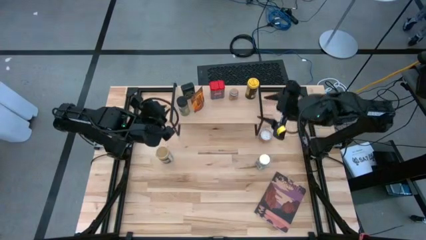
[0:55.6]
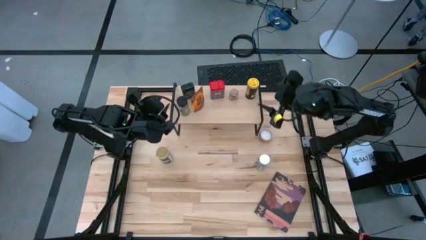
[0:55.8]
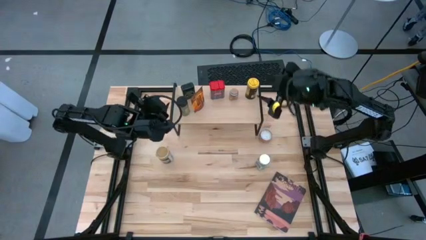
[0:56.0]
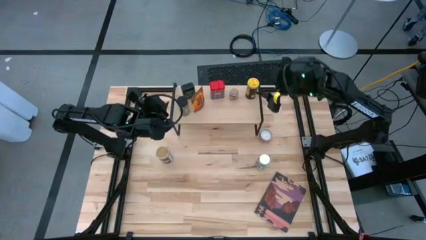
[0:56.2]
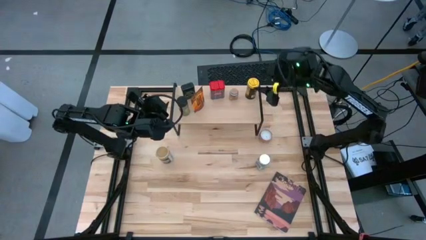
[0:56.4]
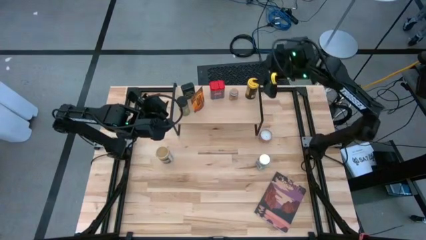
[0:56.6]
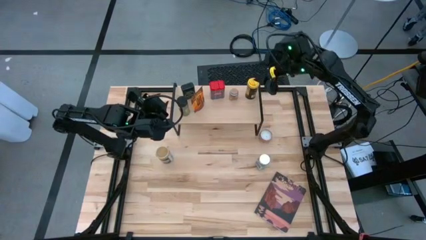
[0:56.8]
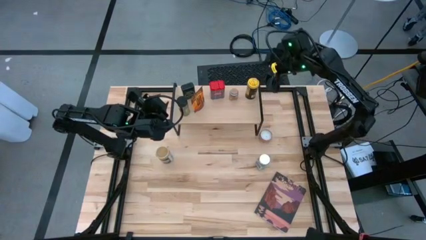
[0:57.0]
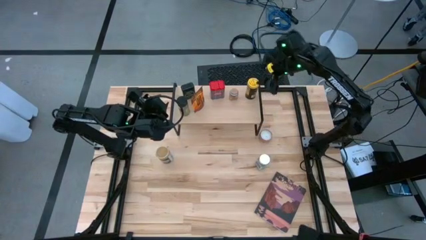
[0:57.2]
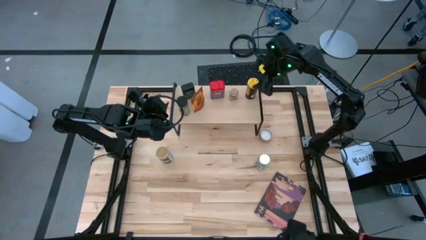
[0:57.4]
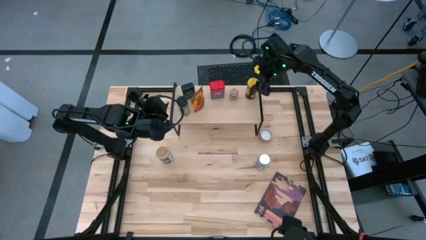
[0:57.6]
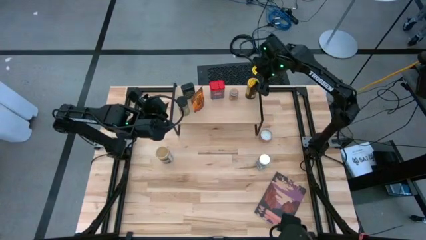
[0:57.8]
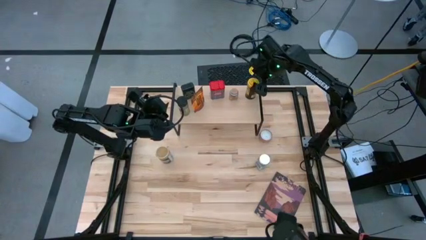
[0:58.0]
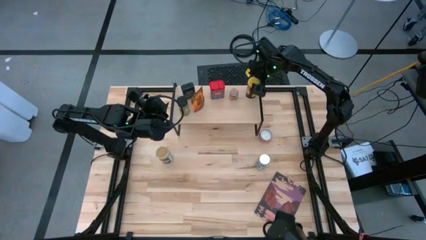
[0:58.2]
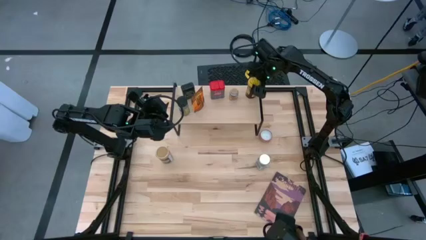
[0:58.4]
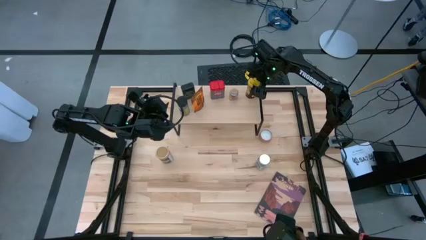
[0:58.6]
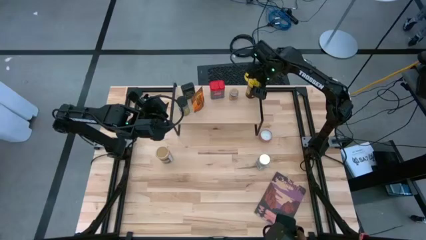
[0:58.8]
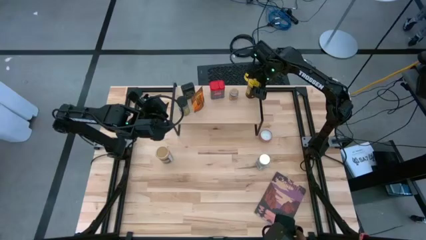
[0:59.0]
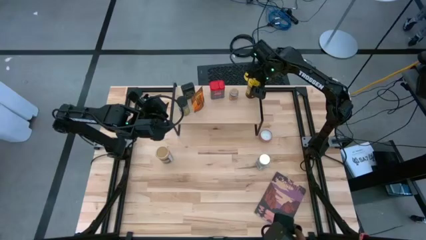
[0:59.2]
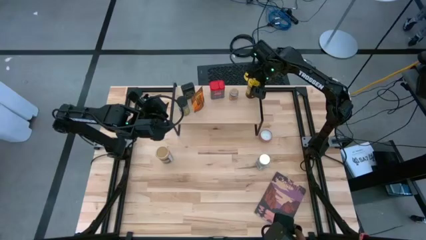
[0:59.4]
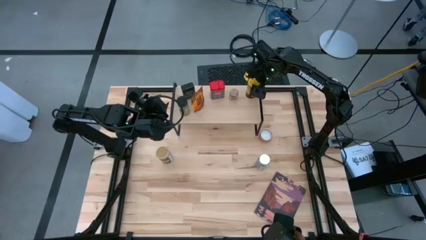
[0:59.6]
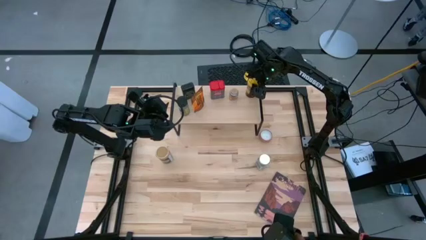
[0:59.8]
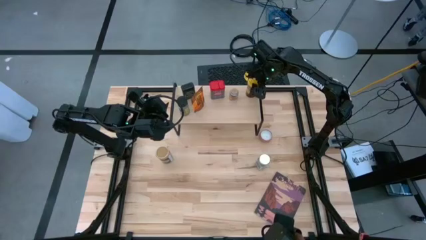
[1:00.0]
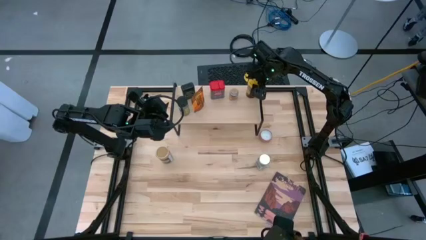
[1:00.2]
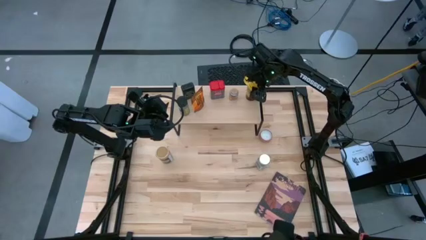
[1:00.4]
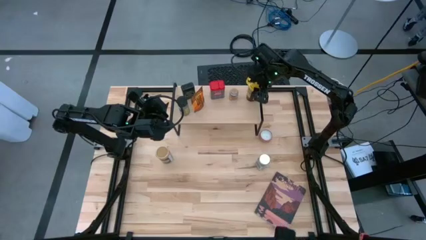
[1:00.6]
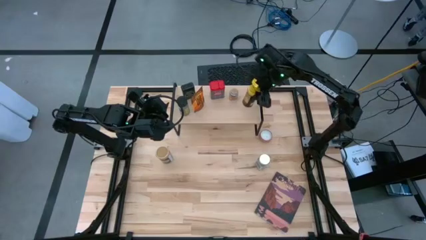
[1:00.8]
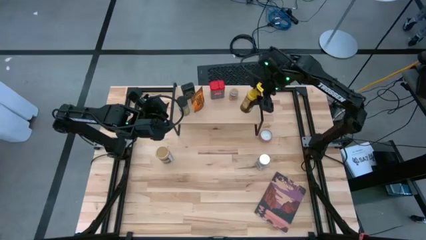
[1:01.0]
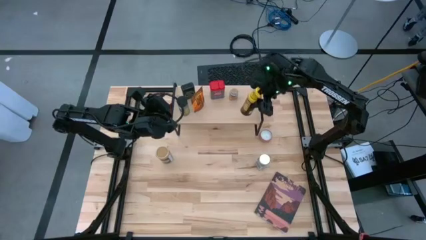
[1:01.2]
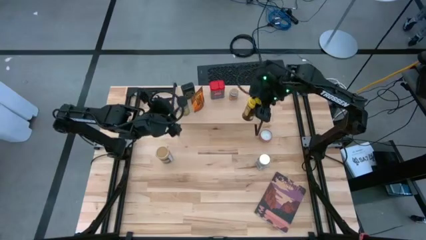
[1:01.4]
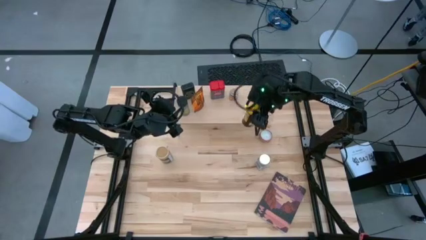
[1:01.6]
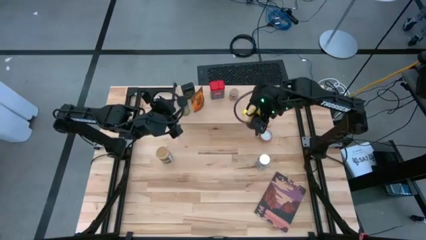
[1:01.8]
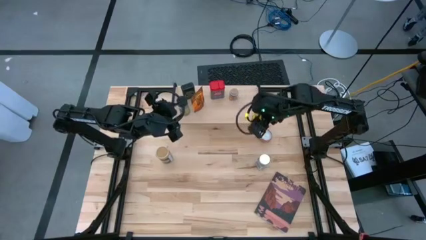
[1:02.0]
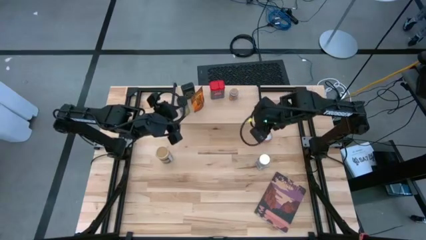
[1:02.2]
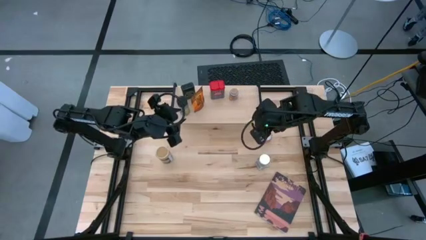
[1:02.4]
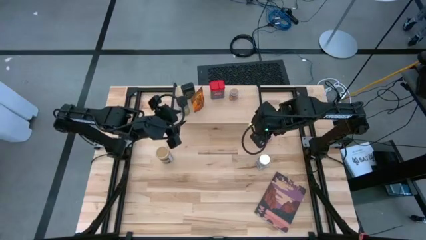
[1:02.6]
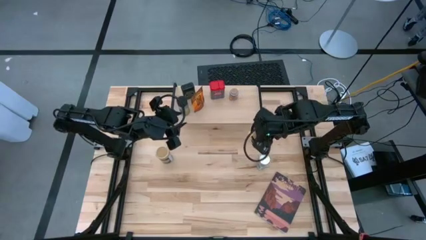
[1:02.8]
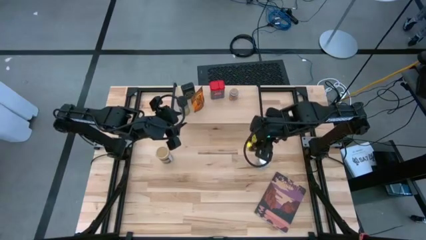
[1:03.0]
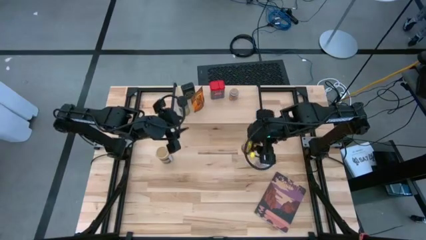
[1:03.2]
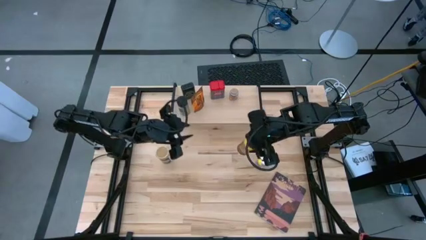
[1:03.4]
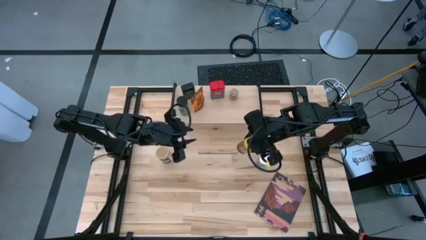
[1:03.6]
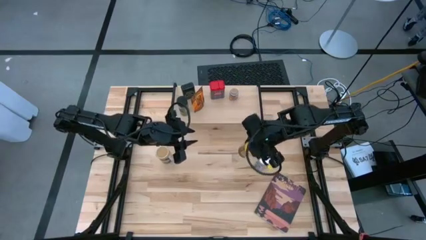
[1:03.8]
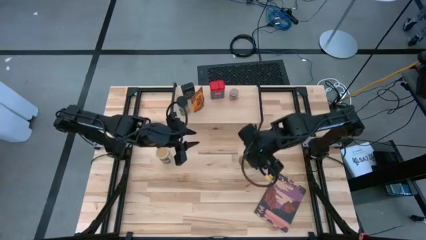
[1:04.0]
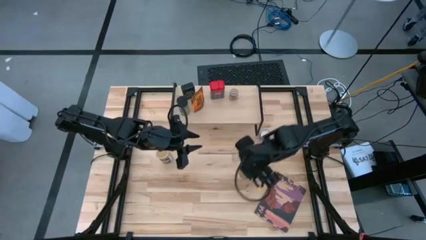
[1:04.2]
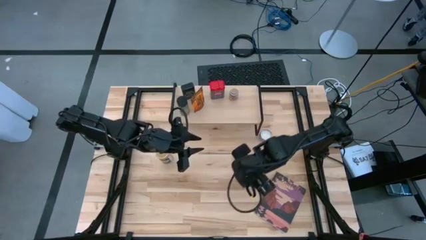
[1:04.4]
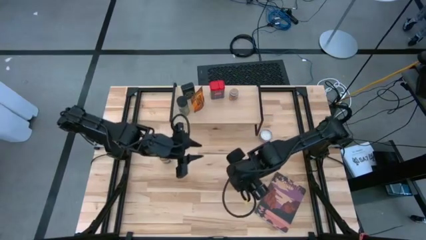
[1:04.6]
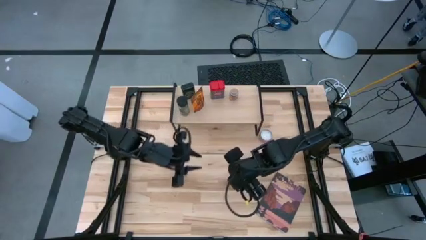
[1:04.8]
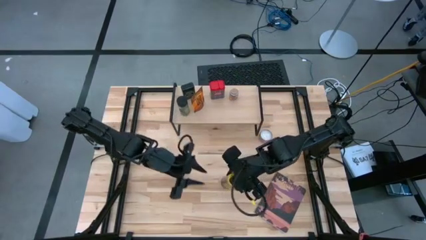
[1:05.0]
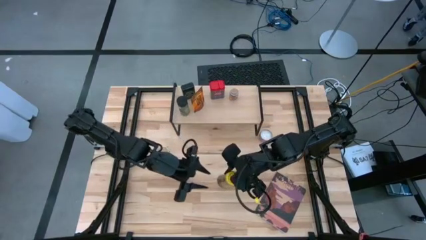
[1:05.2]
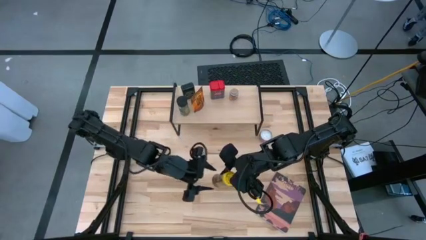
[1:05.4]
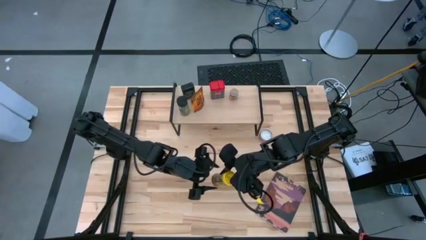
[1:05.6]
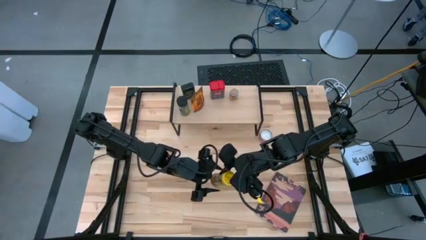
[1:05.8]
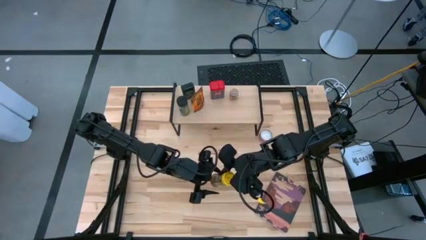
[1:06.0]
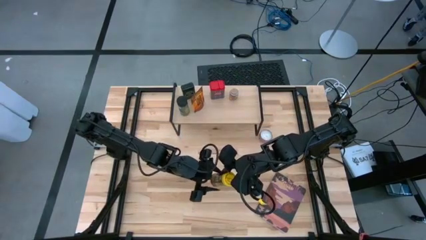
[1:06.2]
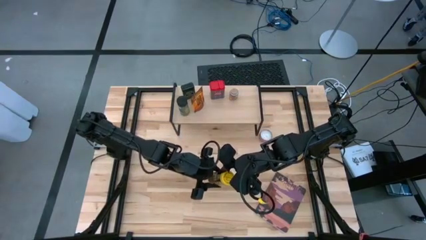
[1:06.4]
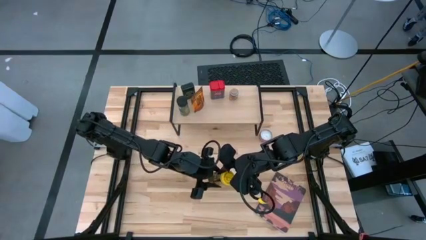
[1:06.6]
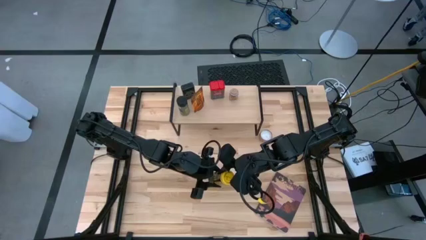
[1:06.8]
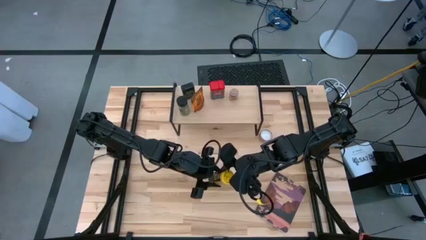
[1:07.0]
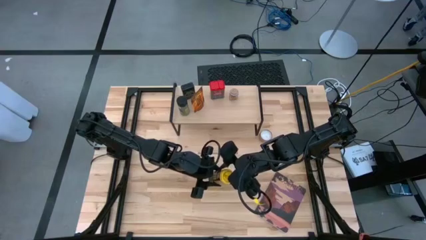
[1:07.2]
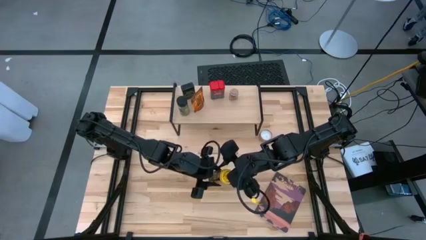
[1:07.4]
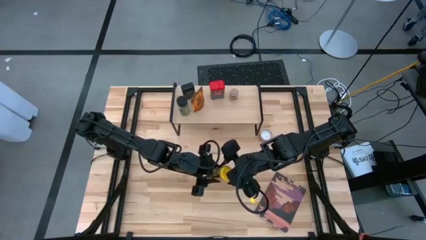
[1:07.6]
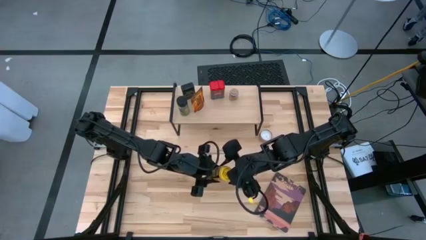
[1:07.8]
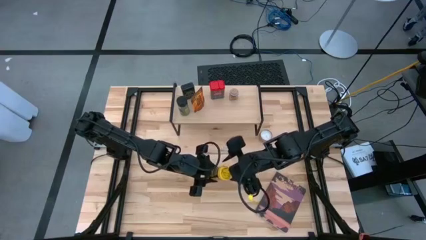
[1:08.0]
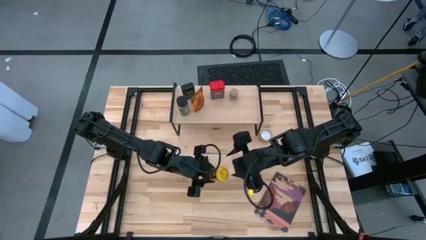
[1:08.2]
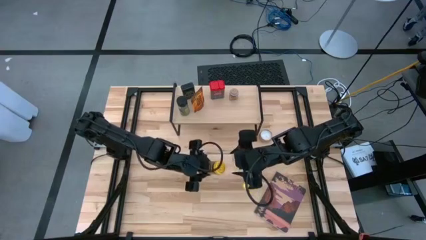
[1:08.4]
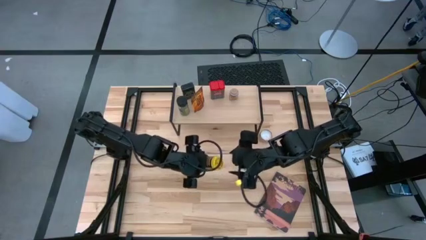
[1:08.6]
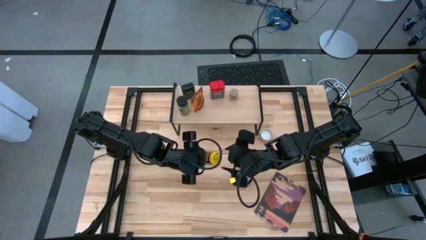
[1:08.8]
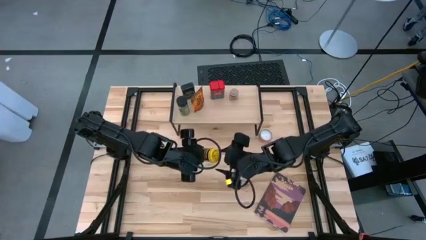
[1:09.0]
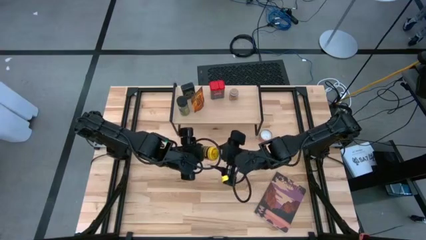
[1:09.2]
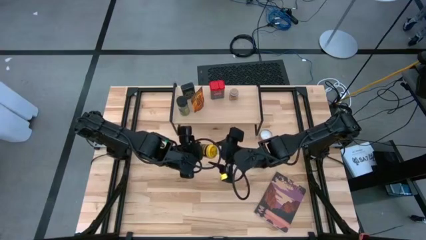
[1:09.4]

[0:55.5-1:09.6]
Task: Shelf spices
Put the yellow spice bottle on the table

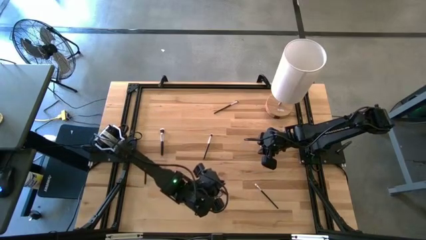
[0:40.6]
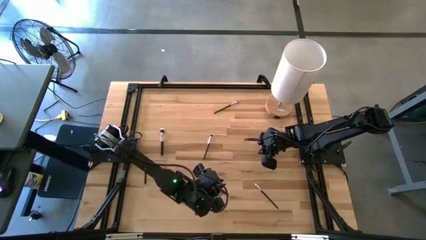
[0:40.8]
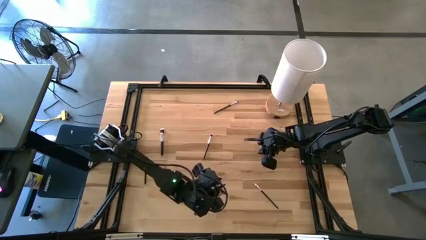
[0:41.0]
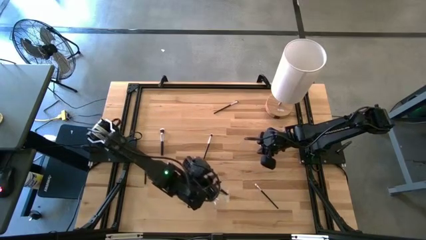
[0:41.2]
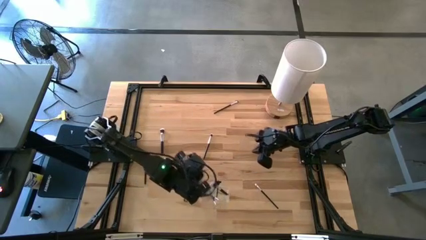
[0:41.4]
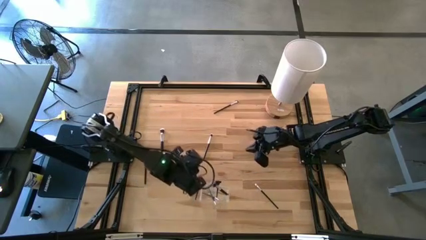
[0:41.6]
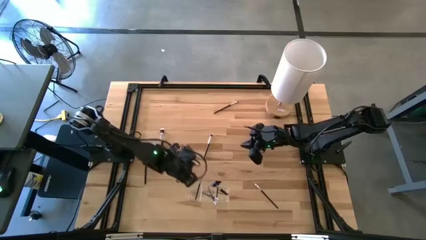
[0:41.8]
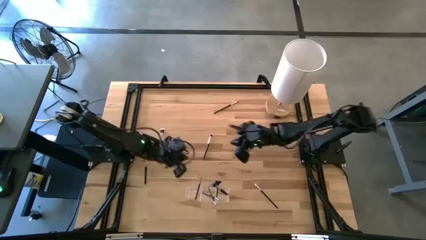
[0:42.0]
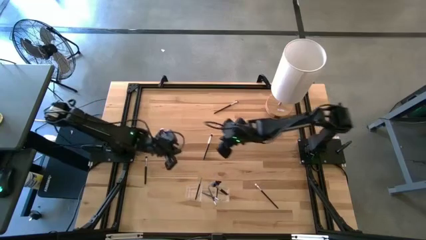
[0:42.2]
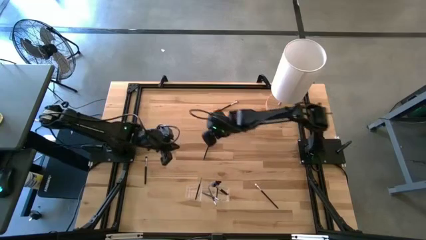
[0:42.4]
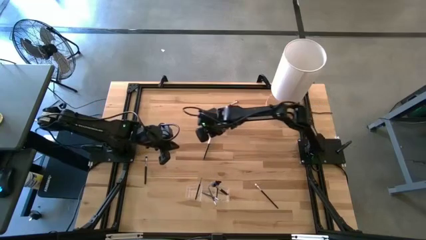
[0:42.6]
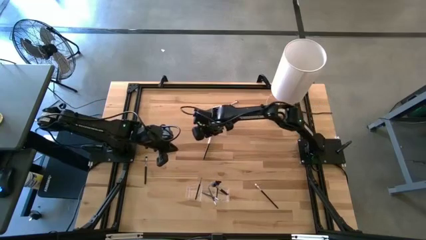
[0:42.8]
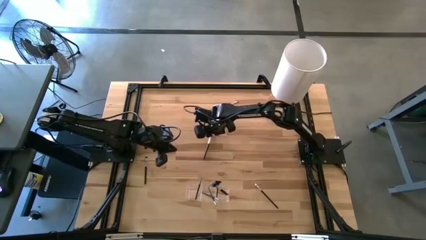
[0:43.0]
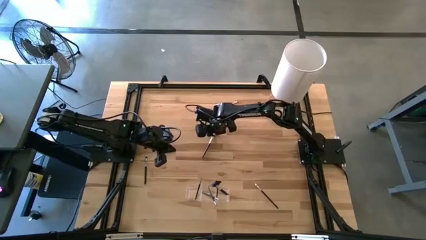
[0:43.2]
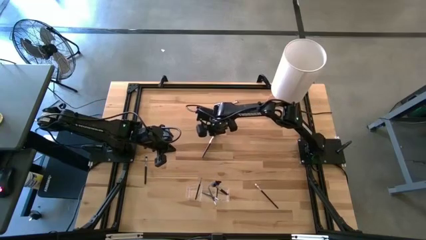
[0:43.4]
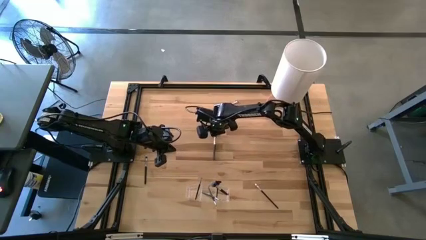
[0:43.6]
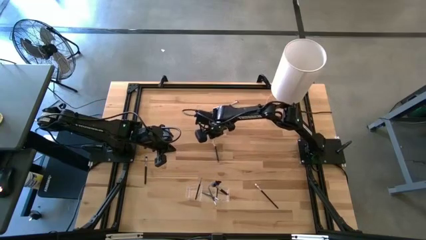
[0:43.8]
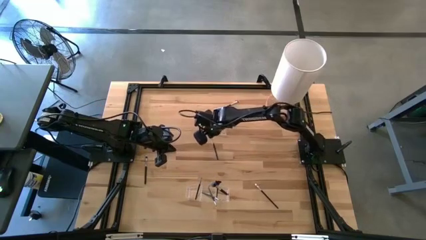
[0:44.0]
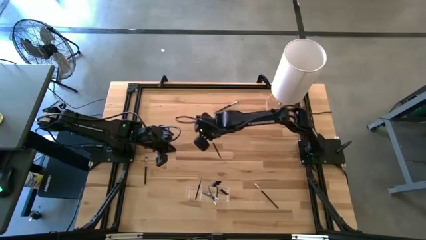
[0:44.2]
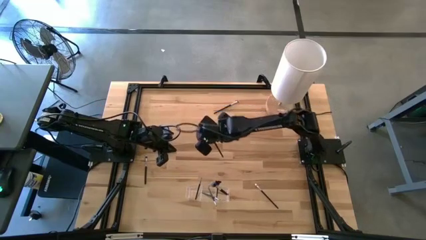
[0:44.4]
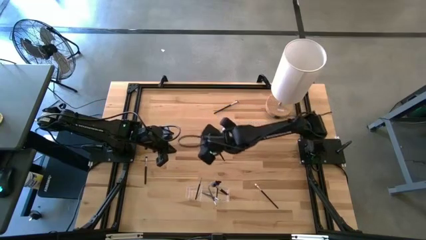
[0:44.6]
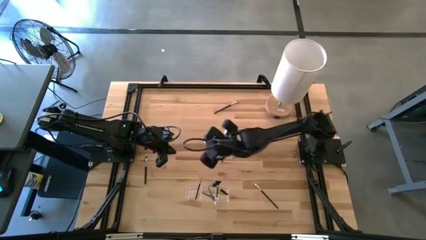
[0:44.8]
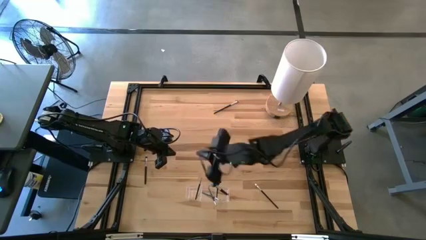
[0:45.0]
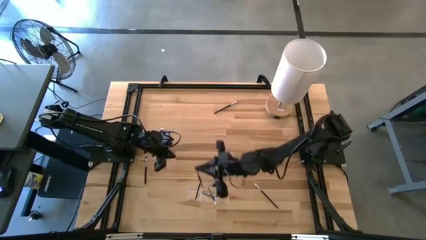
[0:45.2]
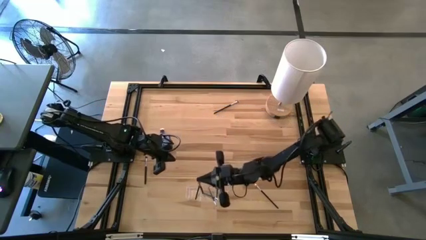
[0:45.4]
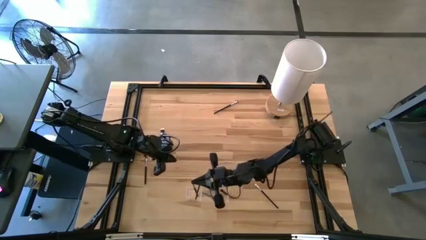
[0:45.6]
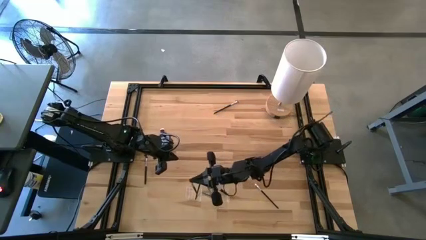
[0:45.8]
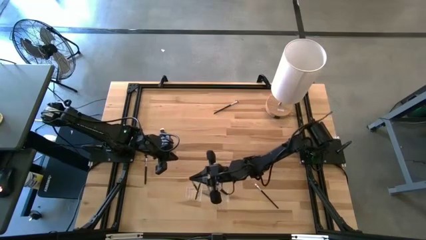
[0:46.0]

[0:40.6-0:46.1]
Task: Put items in baskets/containers
Put the black eyeshadow brush into the transparent organizer
